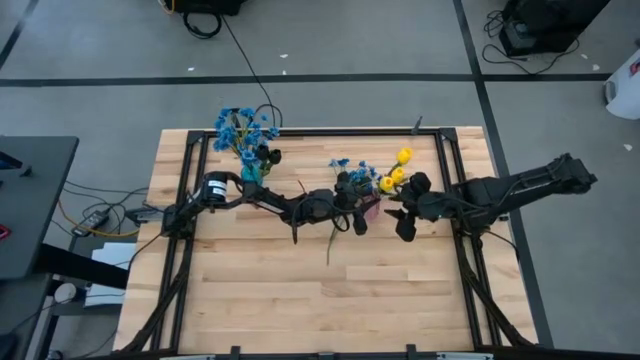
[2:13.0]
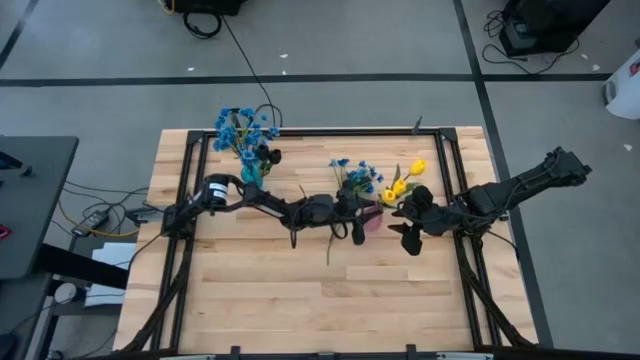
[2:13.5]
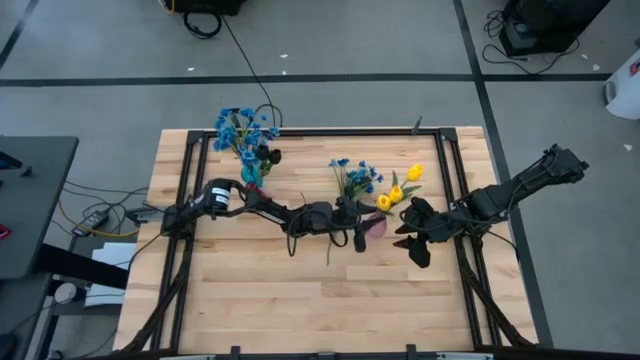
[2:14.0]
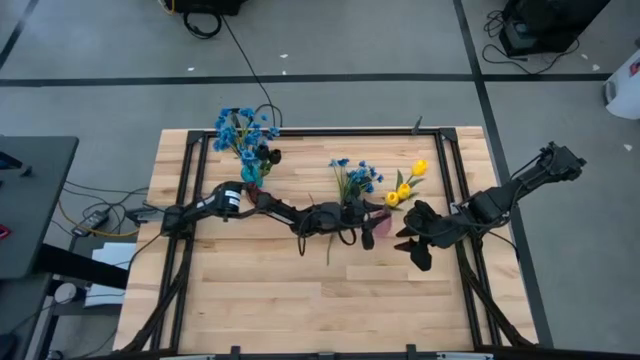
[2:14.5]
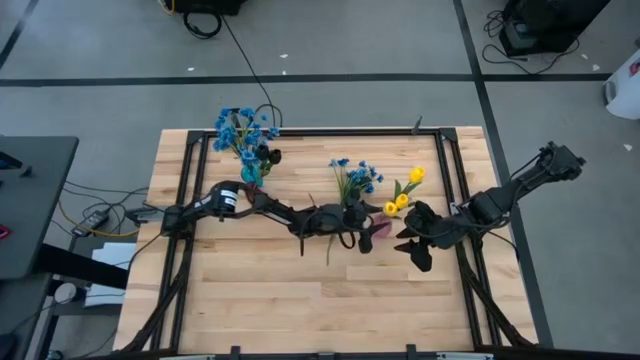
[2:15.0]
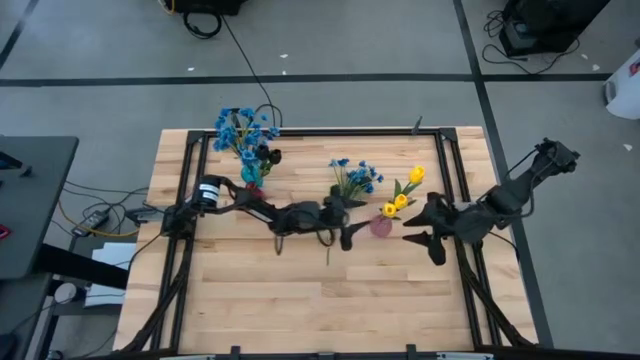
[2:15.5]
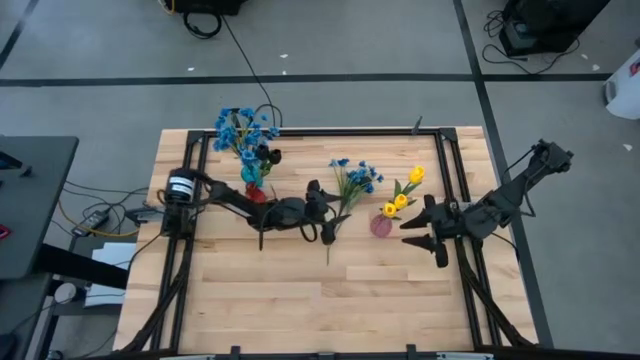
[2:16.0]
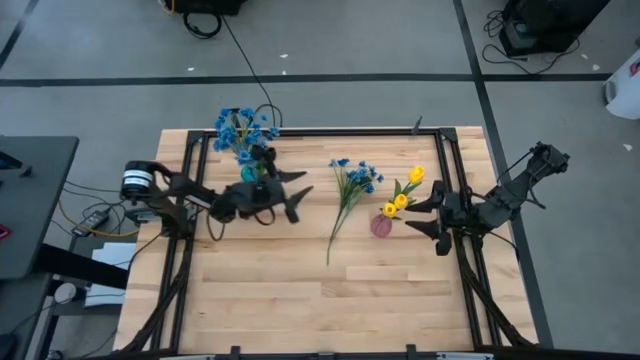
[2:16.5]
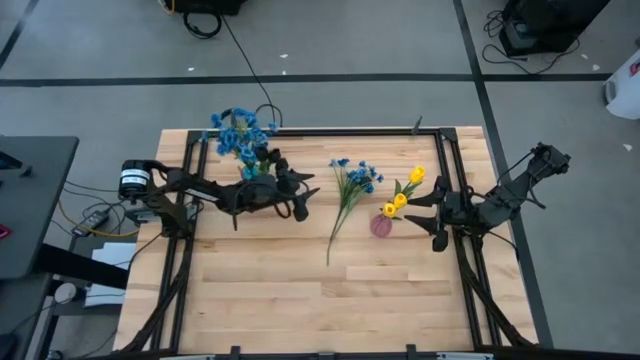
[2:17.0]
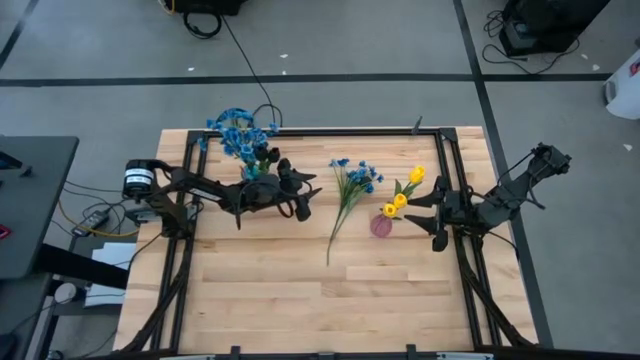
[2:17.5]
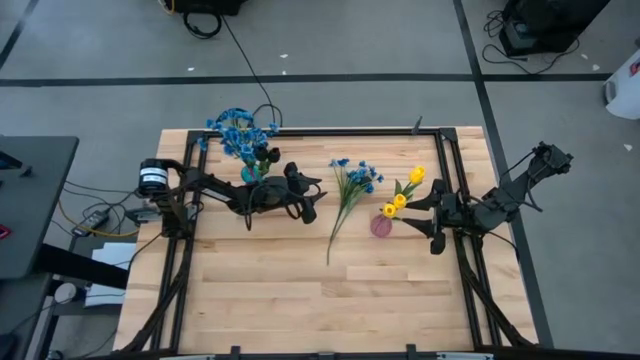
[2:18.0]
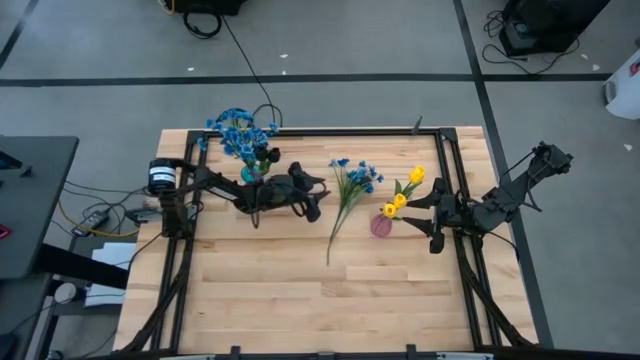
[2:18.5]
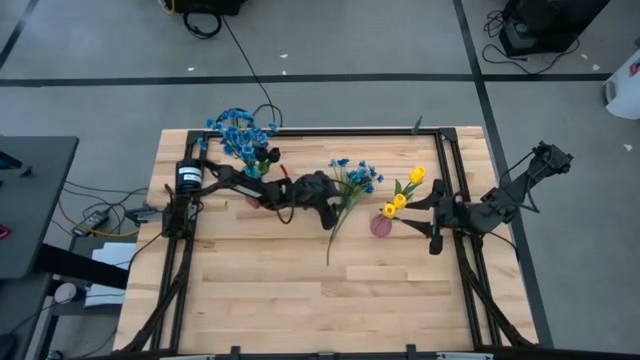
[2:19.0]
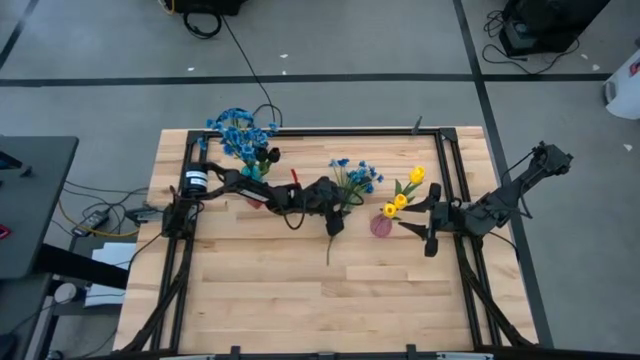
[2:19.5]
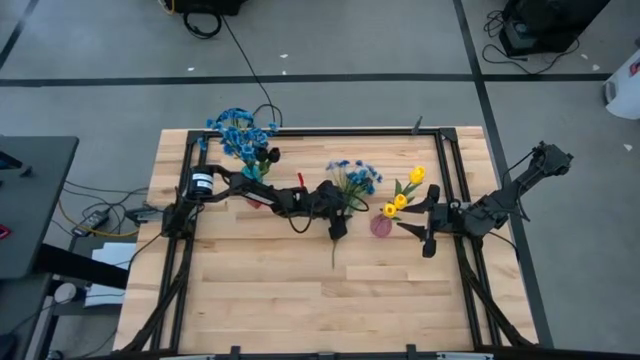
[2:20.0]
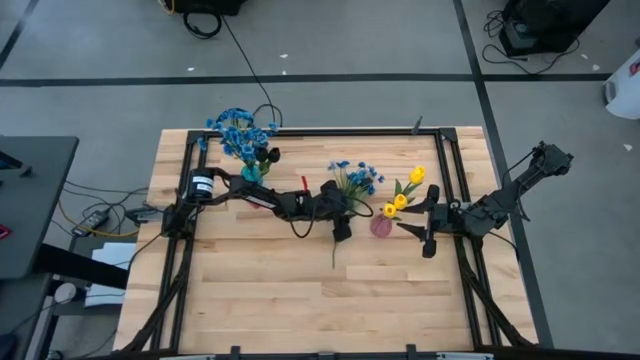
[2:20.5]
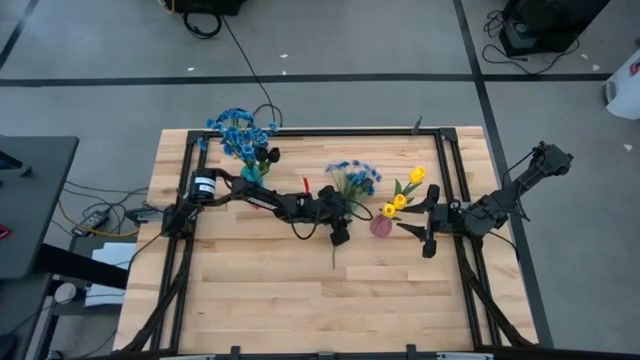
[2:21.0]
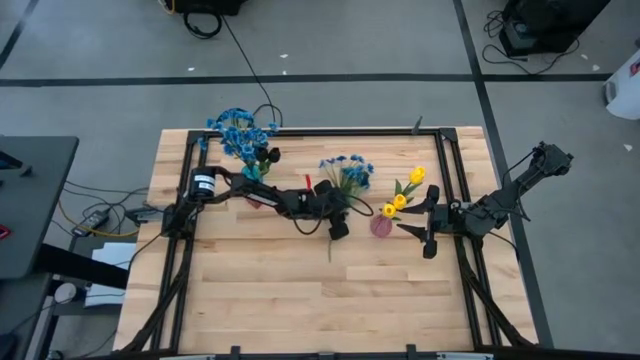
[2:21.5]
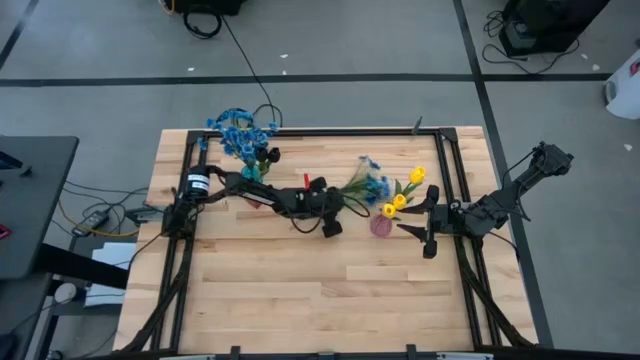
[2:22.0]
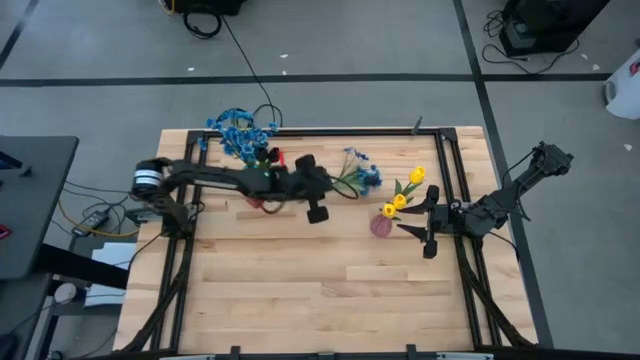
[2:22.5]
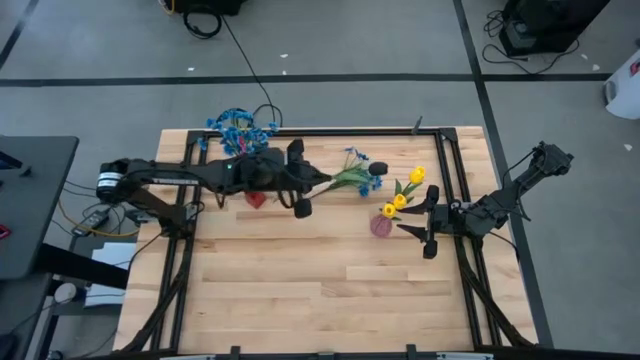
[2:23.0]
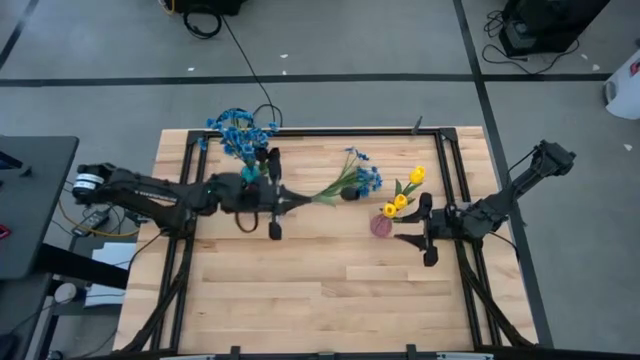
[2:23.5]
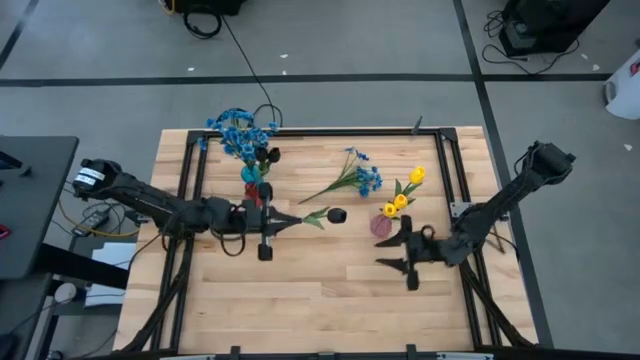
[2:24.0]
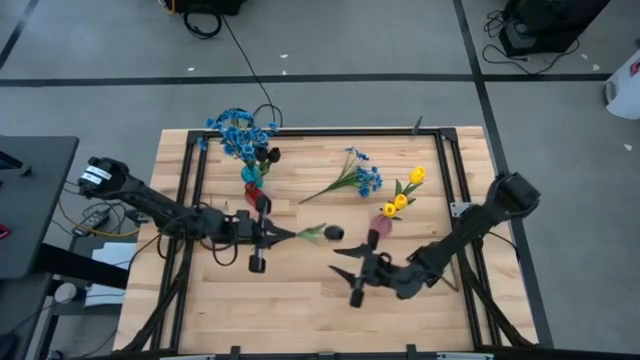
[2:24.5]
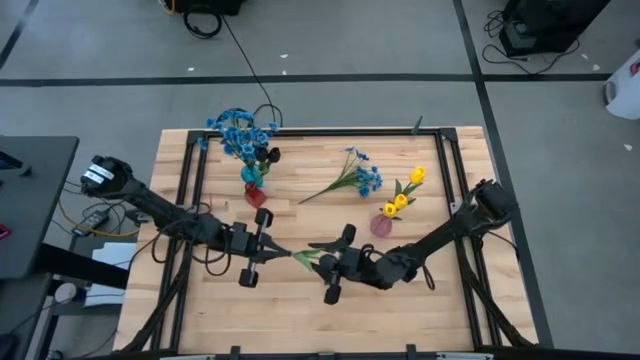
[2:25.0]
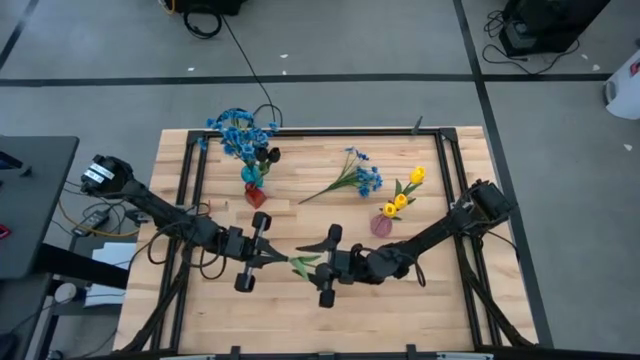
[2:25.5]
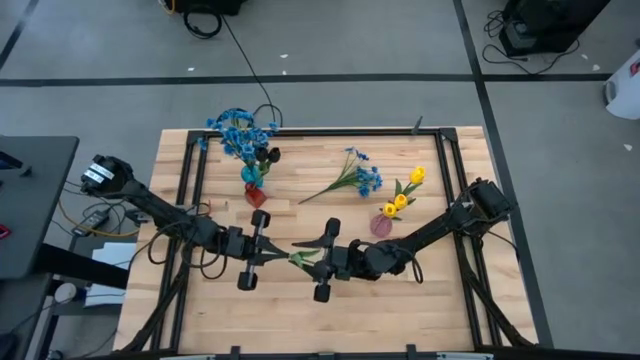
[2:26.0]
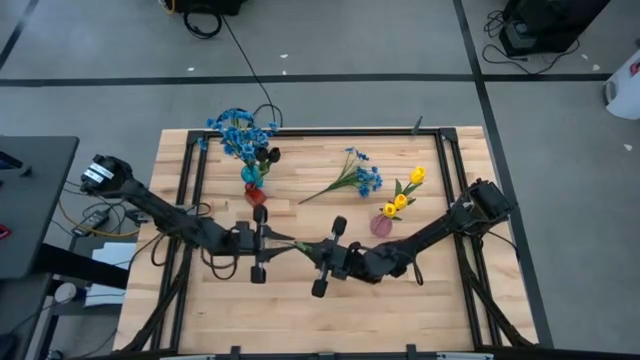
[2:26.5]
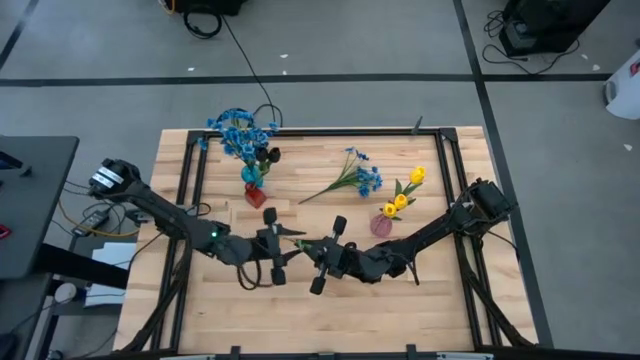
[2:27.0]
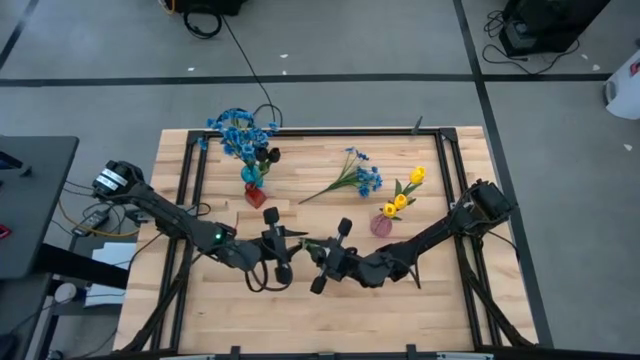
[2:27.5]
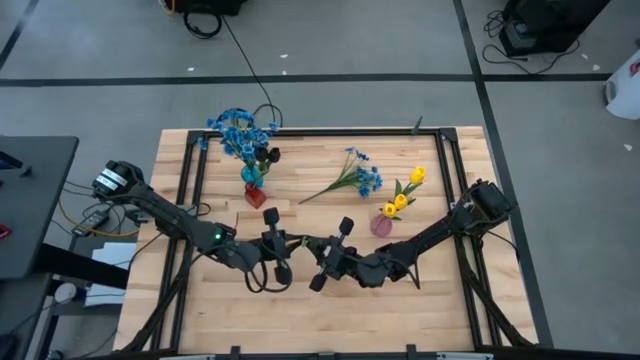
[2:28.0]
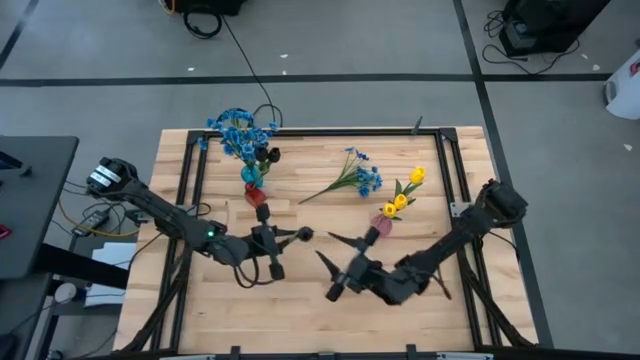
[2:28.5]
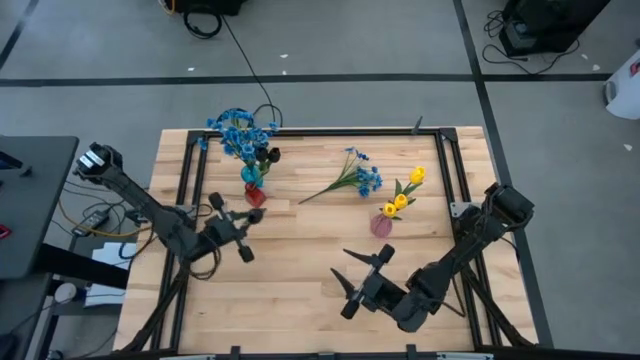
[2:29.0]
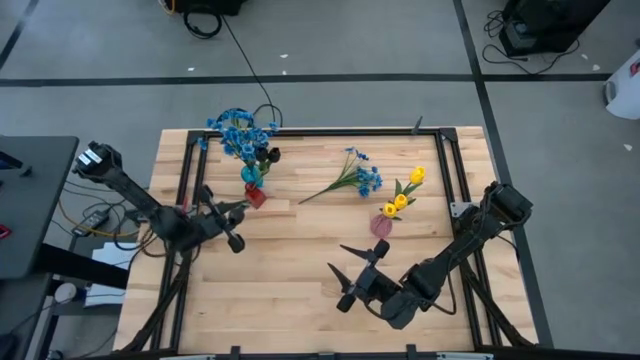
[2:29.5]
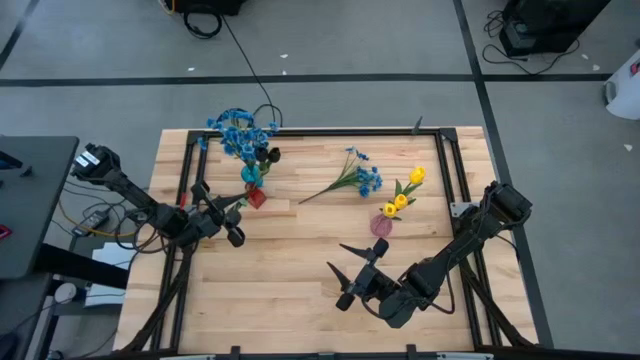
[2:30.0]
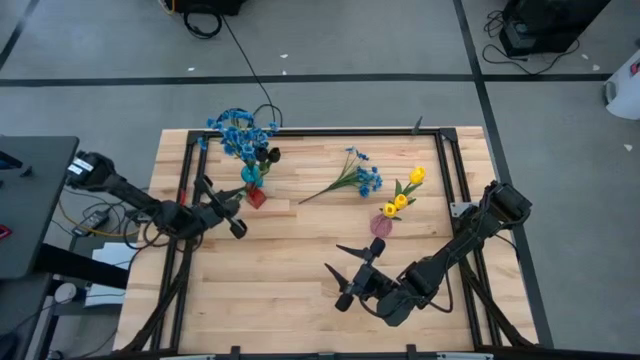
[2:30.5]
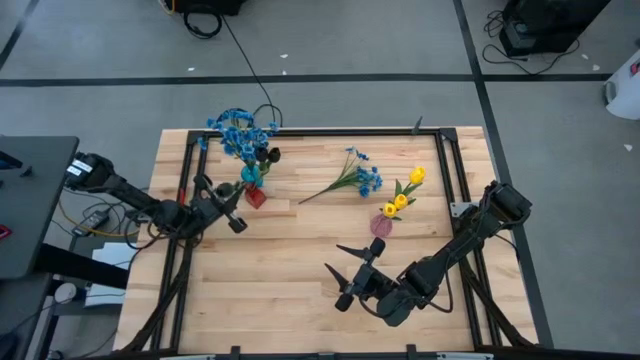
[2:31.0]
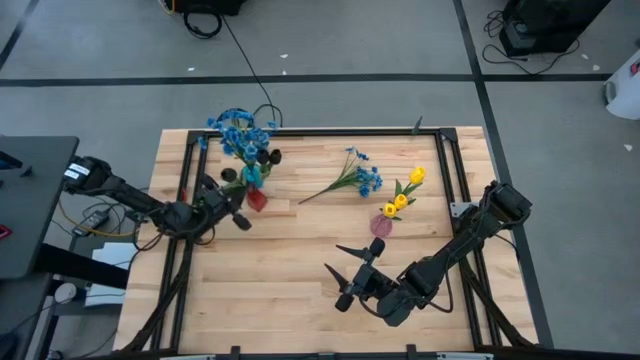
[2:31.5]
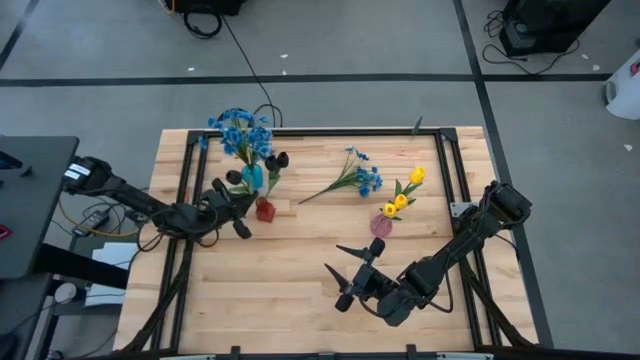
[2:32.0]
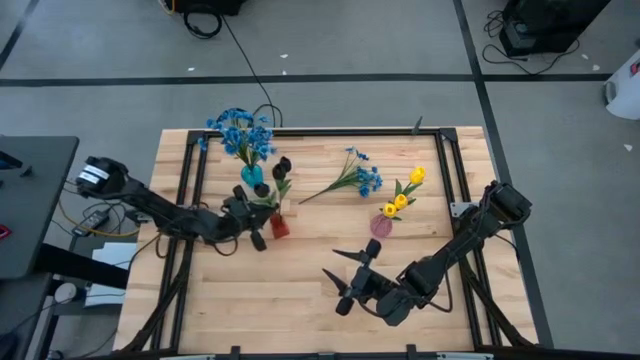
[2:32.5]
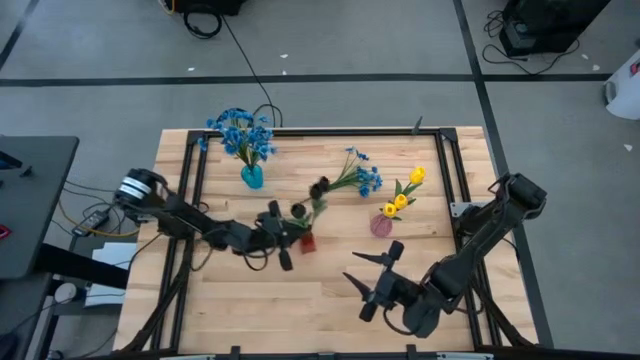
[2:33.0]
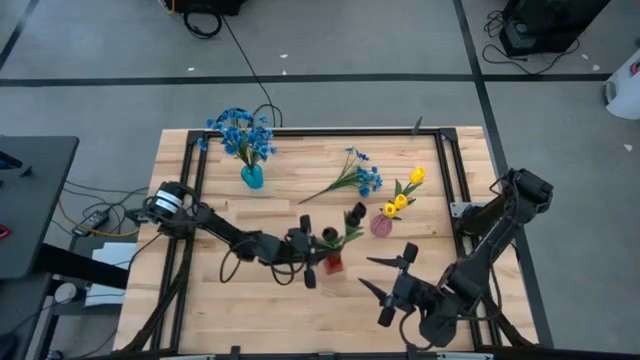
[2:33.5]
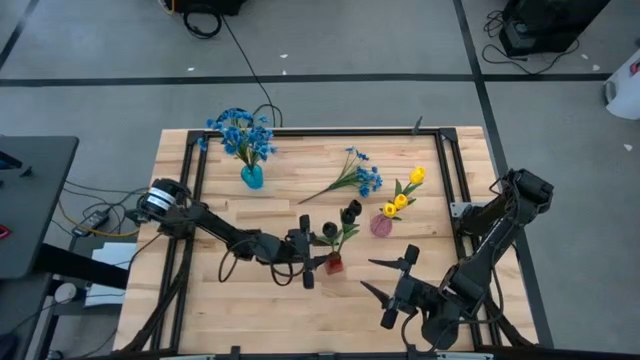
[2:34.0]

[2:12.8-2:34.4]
Task: Sort flowers into vase by color
Put the black flower into the red vase
